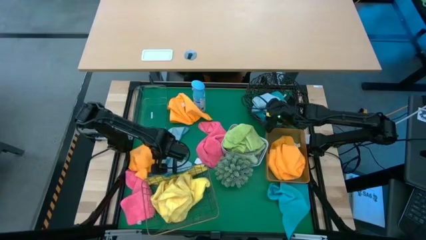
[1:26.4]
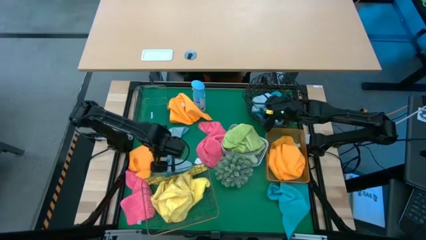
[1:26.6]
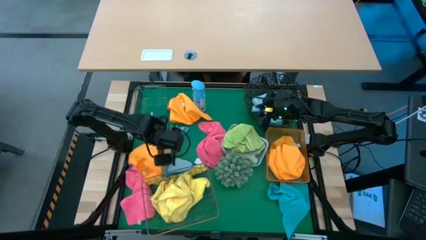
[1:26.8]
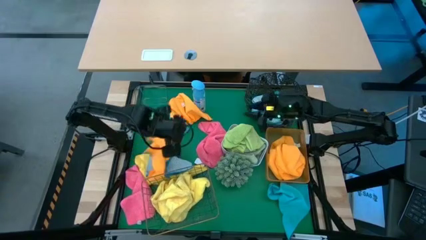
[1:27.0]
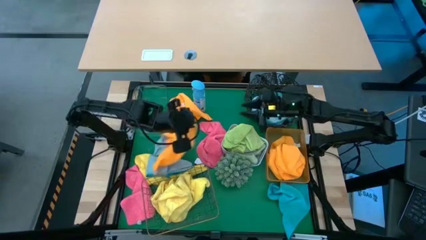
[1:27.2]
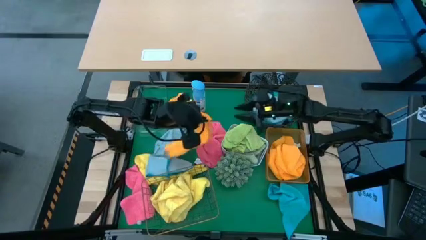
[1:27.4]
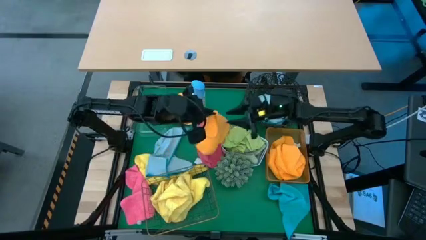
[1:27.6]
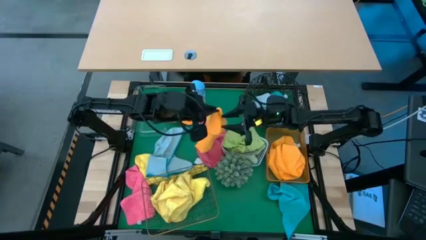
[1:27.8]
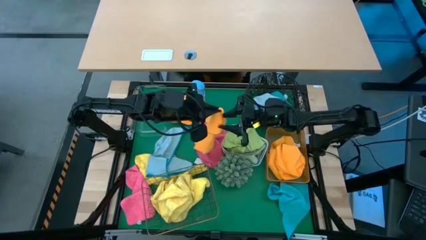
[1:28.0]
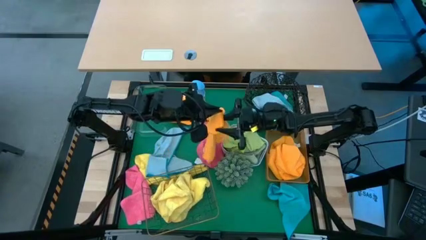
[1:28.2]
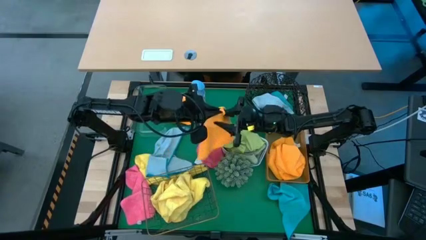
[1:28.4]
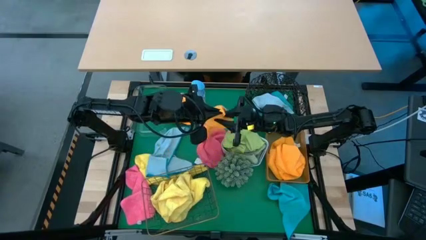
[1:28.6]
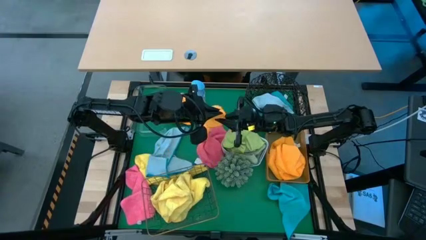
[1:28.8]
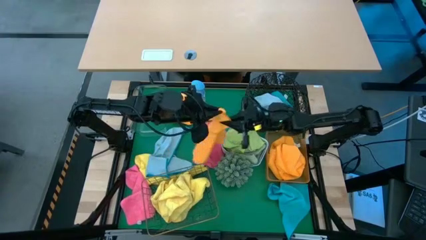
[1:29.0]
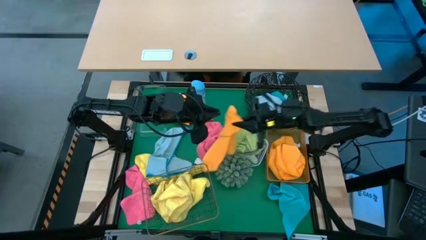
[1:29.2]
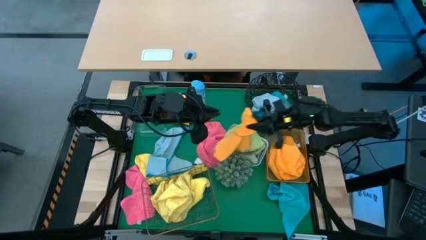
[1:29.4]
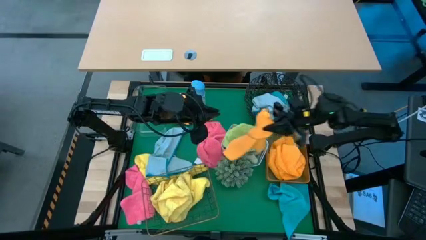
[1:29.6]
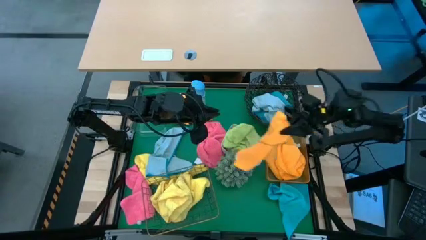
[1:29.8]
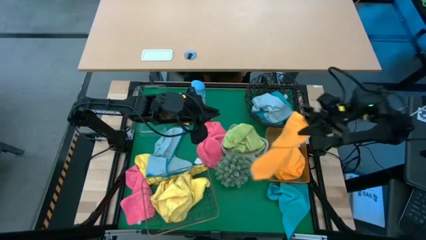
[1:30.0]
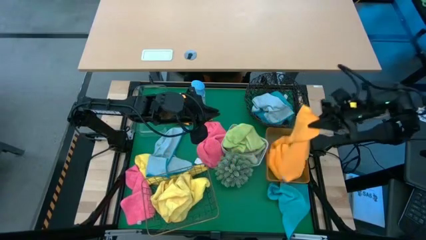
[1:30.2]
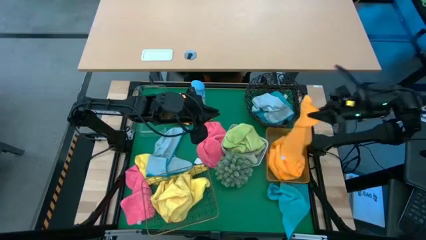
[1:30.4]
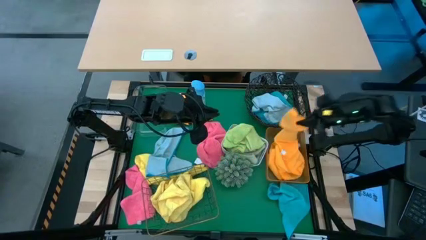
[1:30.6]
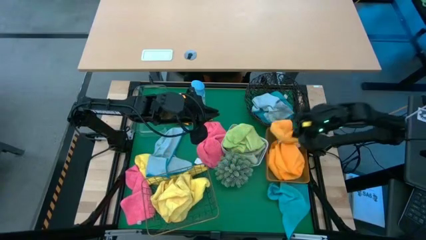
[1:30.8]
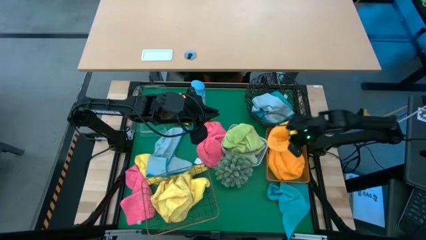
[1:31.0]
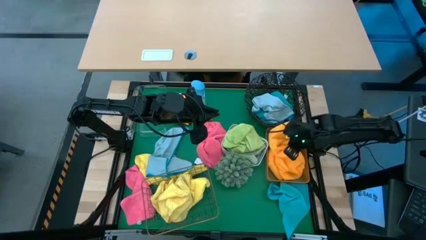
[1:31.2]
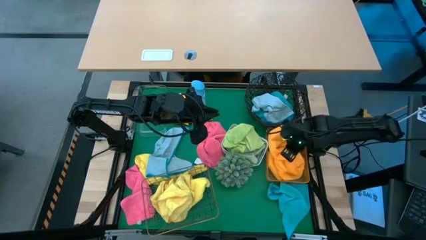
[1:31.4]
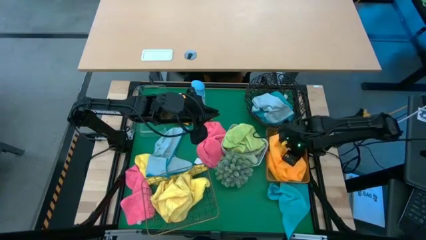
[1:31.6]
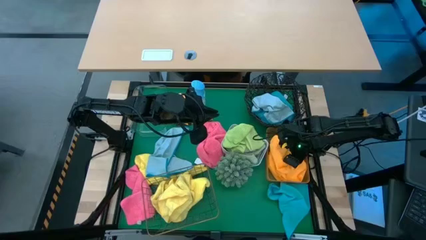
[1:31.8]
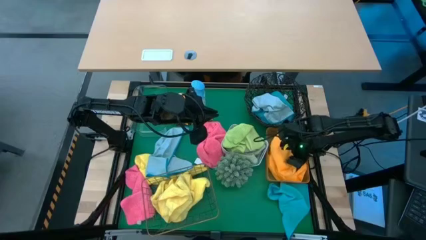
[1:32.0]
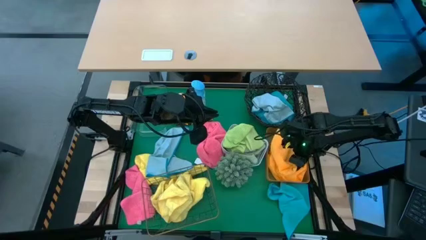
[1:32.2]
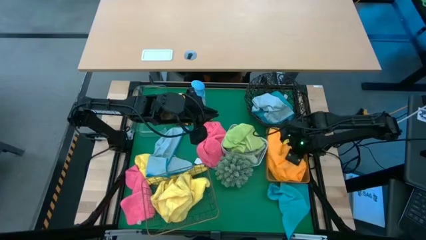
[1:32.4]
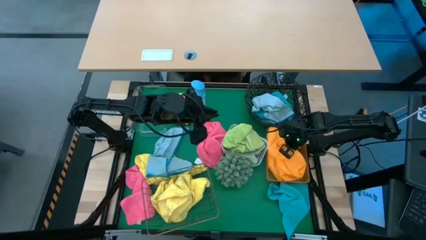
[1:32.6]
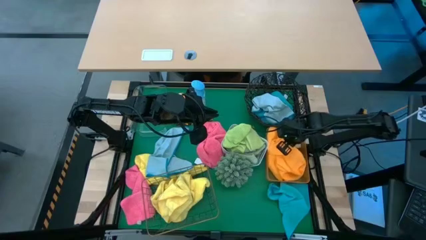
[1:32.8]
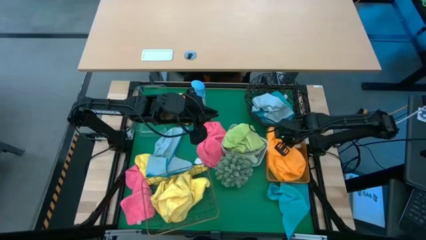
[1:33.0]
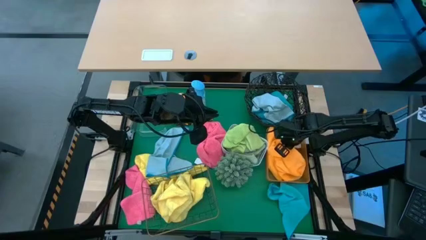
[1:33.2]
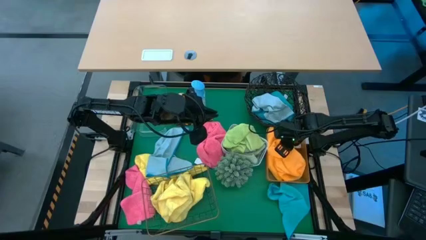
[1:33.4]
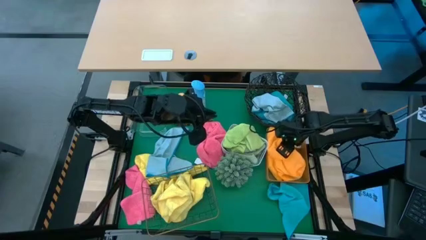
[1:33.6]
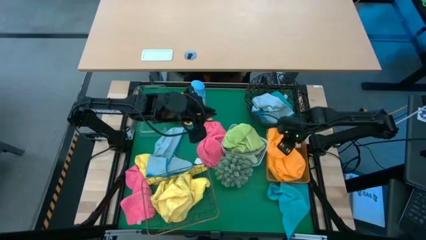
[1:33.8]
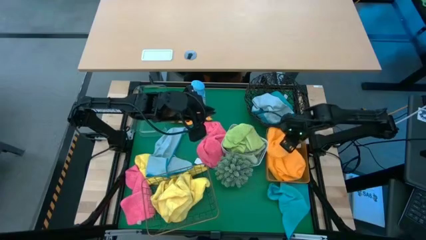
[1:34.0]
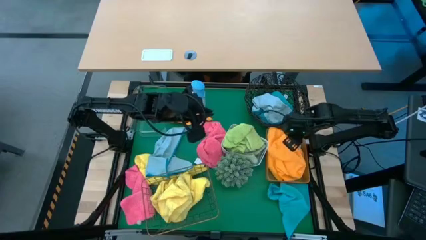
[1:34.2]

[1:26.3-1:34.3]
Task: Sort microfiber towel by color & place in baskets
Put the orange microfiber cloth into the orange bin

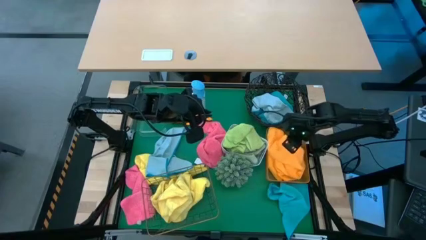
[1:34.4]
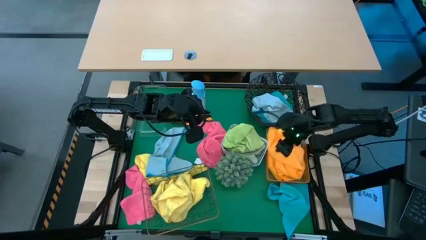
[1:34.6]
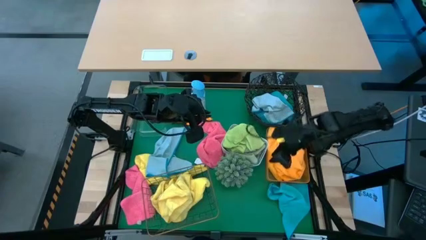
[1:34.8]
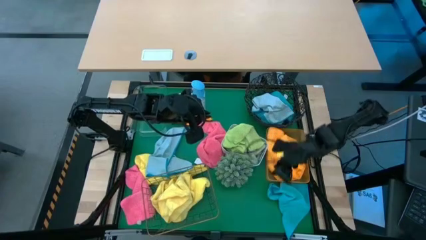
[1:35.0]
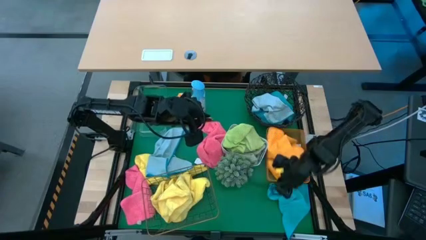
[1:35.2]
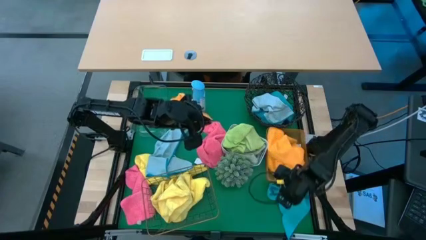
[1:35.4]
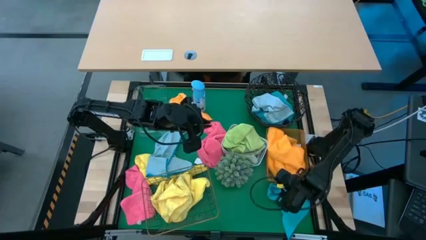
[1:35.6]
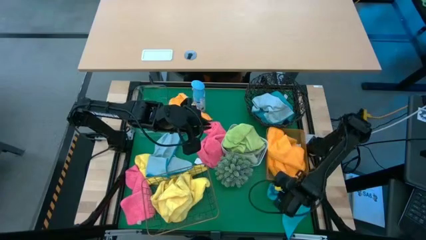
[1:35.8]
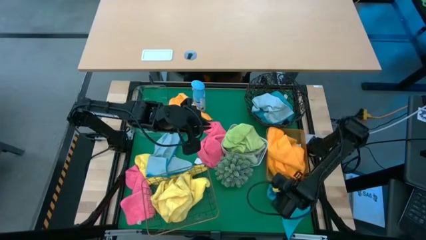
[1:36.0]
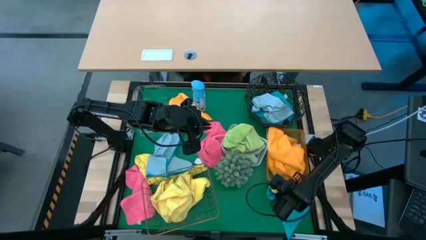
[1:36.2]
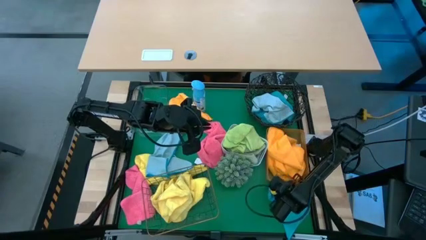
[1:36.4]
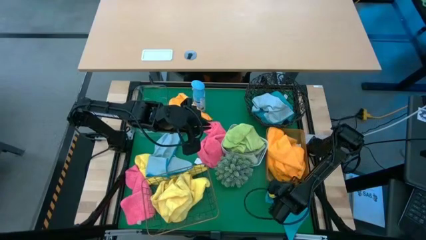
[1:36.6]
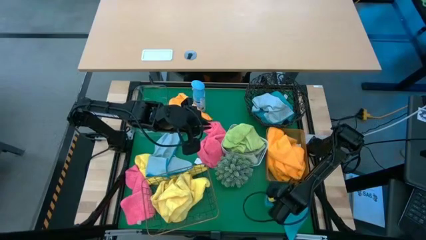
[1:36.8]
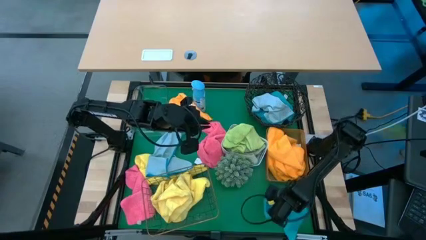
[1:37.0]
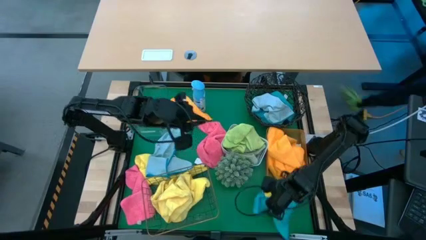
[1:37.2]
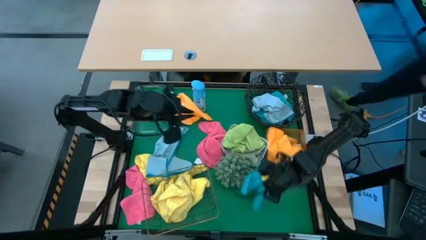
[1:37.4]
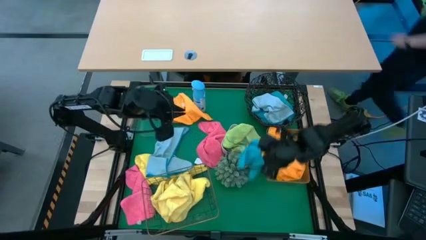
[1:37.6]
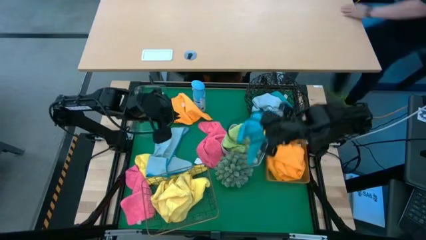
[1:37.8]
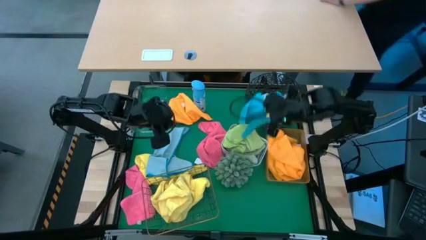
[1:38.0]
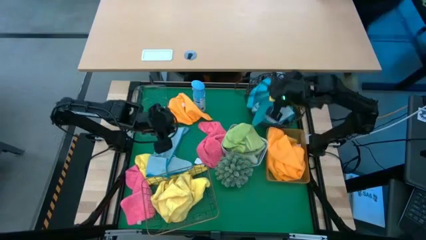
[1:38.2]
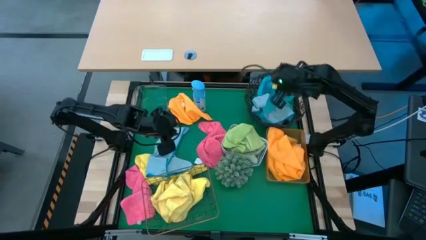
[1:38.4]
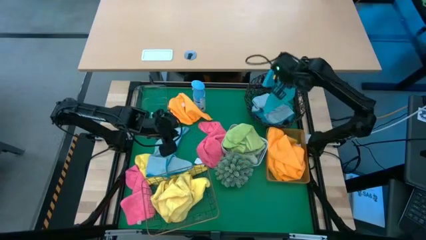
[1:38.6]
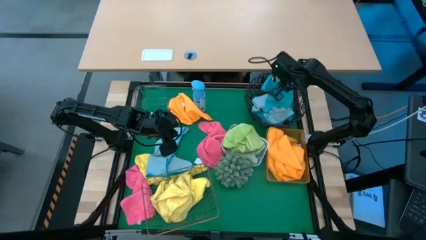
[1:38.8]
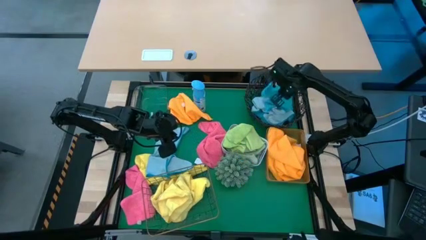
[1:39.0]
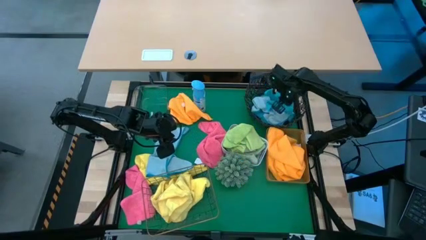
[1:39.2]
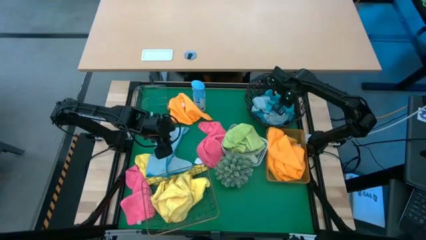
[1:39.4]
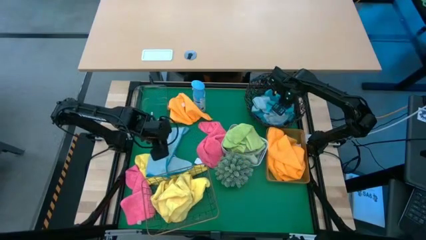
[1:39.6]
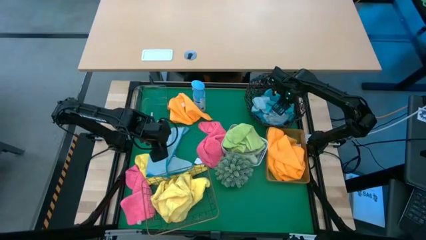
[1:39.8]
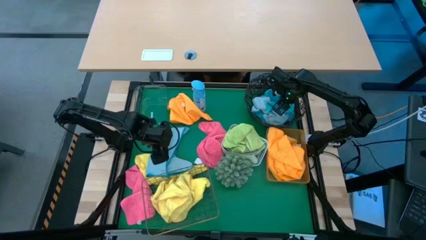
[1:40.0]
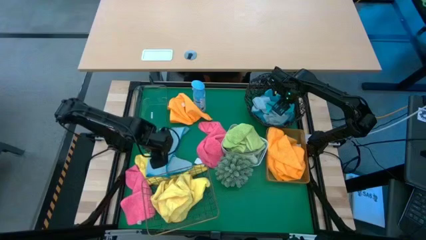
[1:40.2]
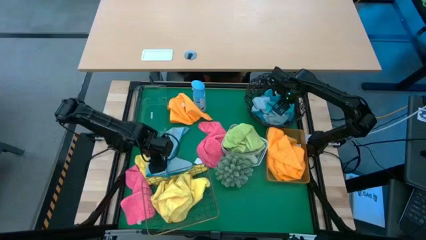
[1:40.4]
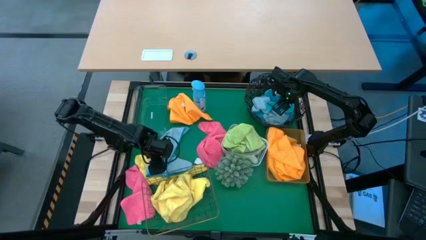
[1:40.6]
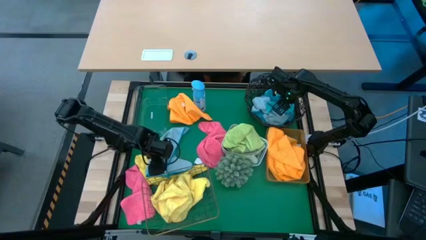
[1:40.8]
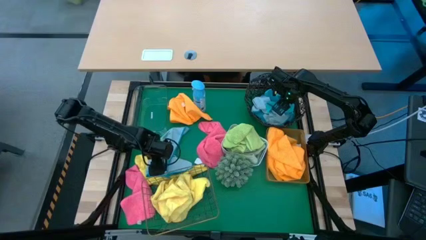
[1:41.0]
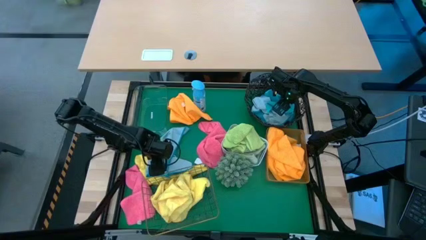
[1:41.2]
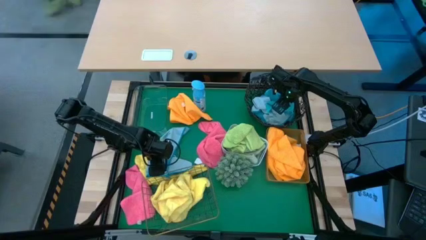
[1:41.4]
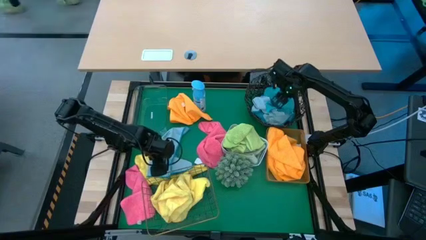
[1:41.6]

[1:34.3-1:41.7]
Put the blue towel into the black basket
